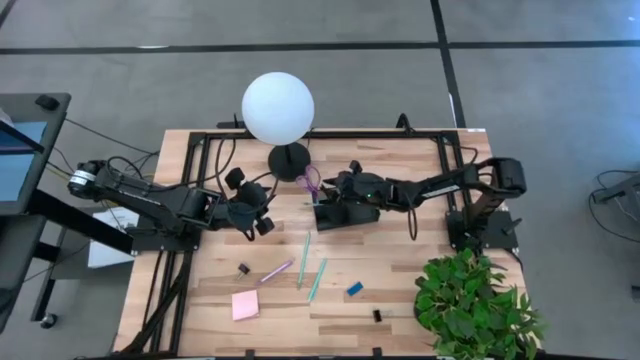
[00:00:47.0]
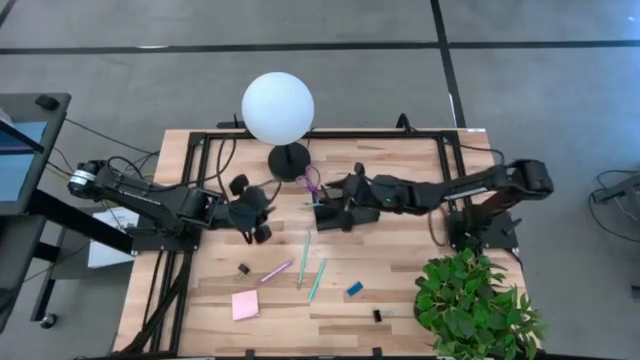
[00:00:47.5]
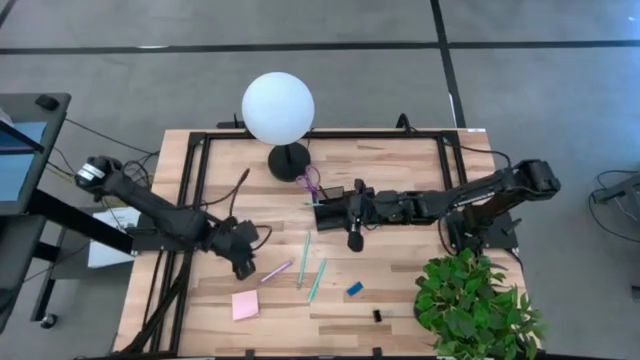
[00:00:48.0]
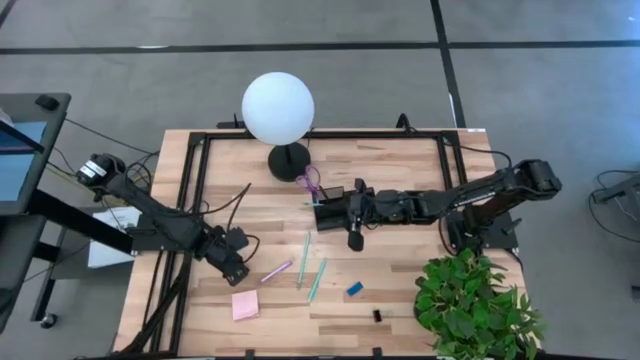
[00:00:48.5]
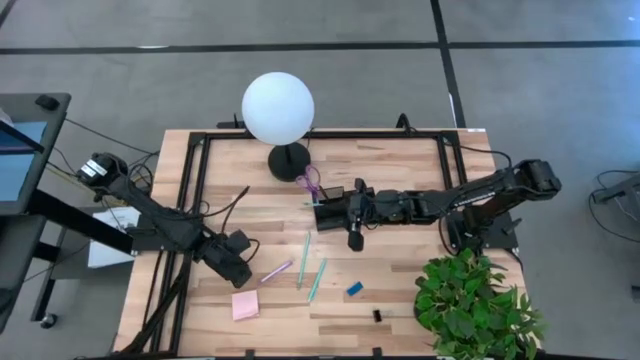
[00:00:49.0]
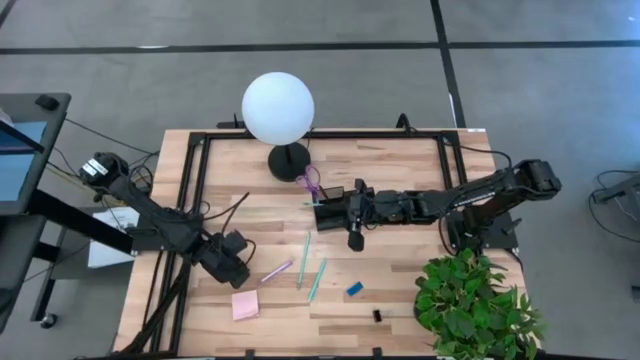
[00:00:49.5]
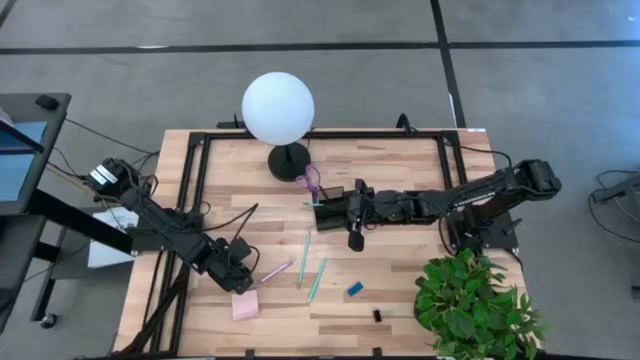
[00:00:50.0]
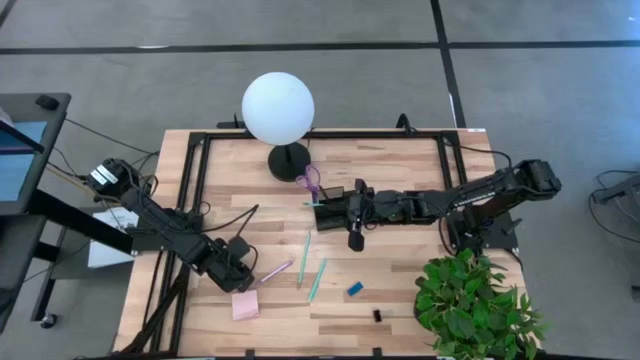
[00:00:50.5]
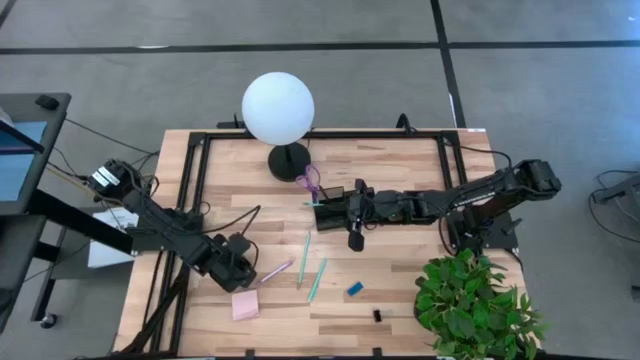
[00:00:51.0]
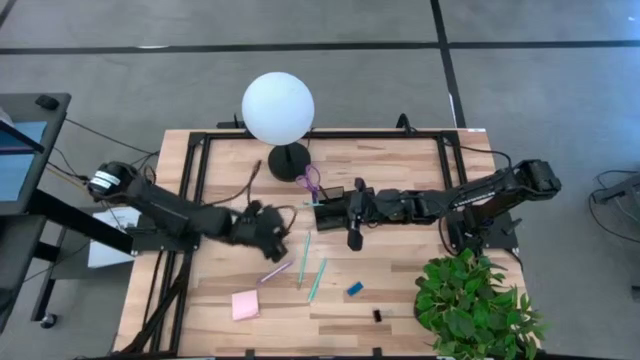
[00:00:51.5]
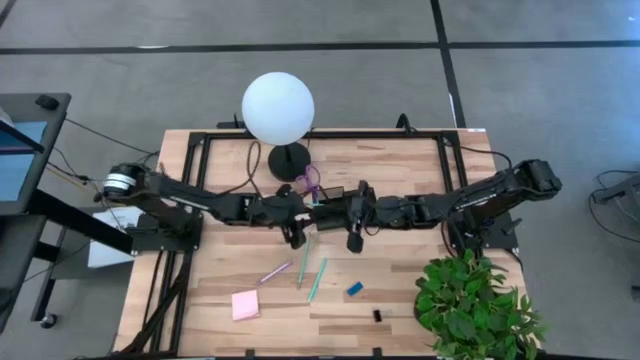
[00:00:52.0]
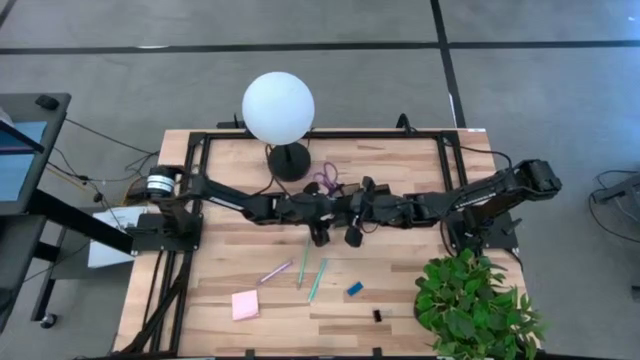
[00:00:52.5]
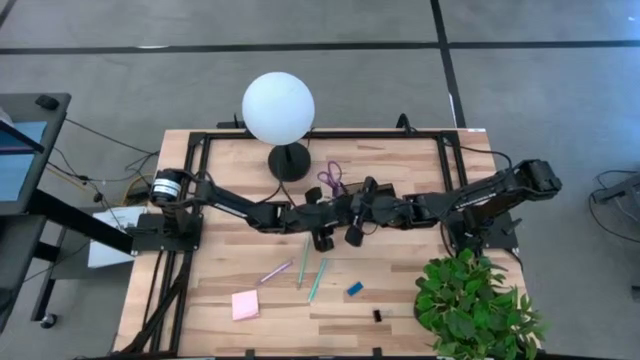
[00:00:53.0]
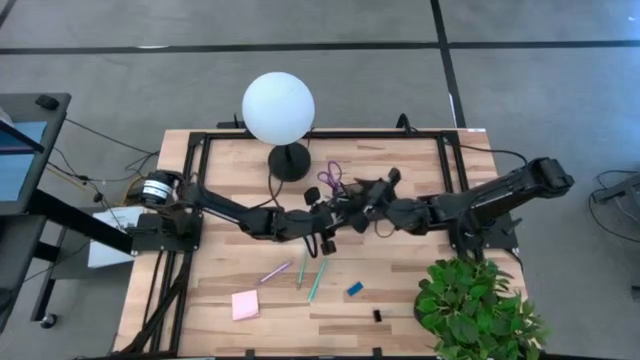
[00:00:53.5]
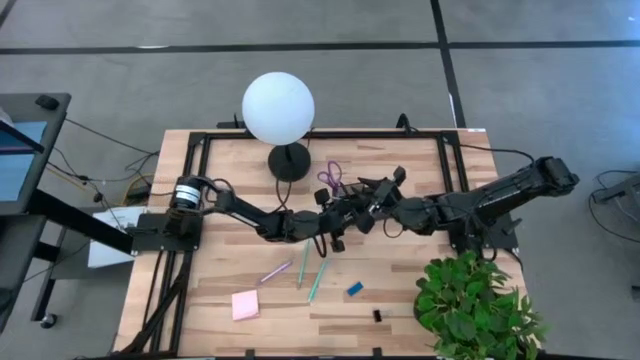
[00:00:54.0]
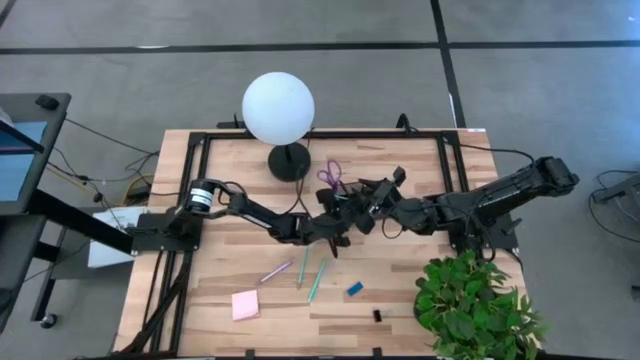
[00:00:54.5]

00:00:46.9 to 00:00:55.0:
Task: Pick and place office supplies into organizer
Put the top black binder clip into the black desk organizer

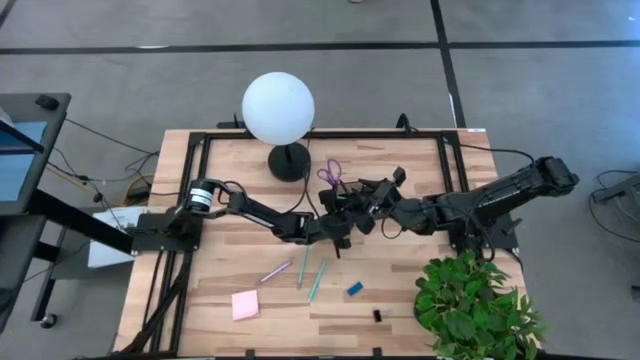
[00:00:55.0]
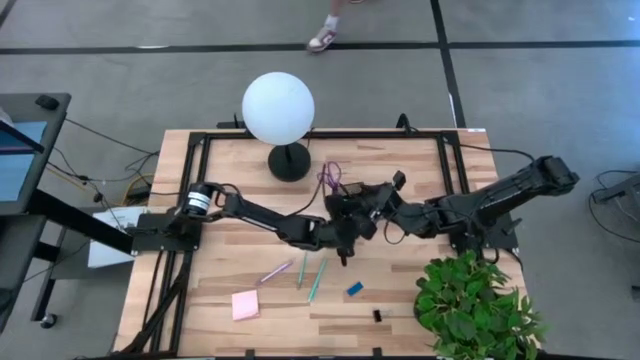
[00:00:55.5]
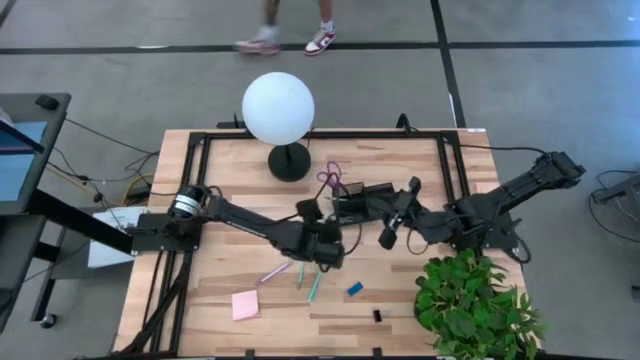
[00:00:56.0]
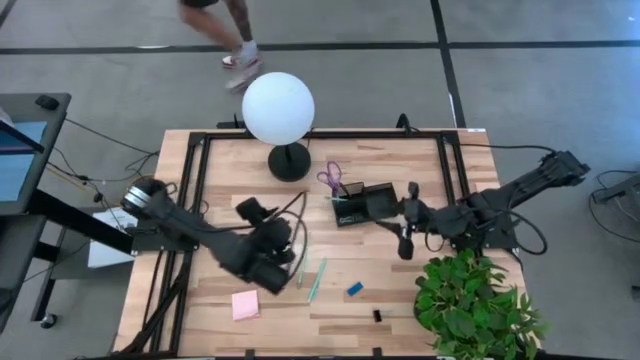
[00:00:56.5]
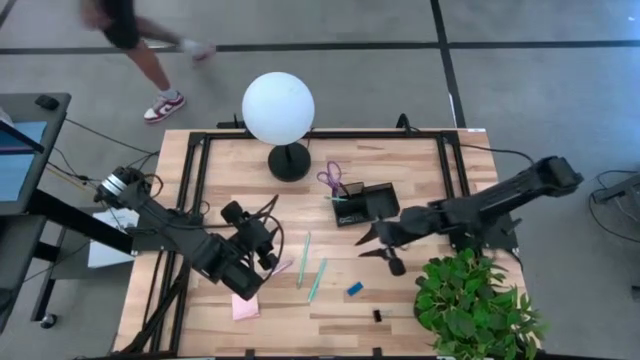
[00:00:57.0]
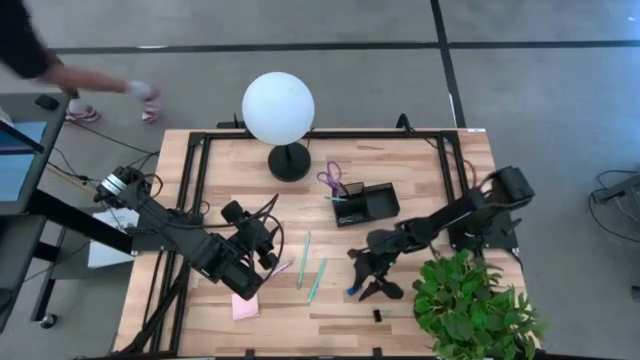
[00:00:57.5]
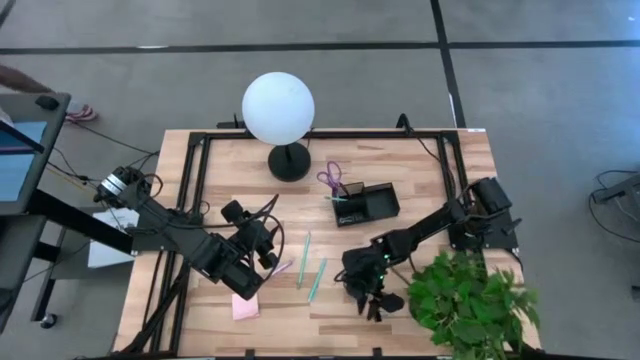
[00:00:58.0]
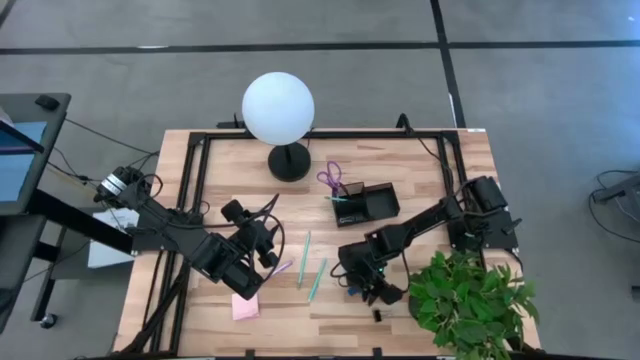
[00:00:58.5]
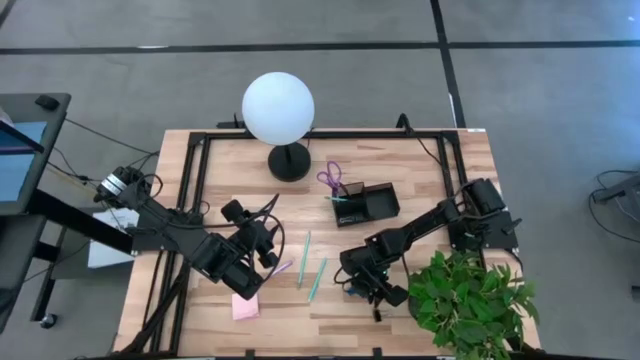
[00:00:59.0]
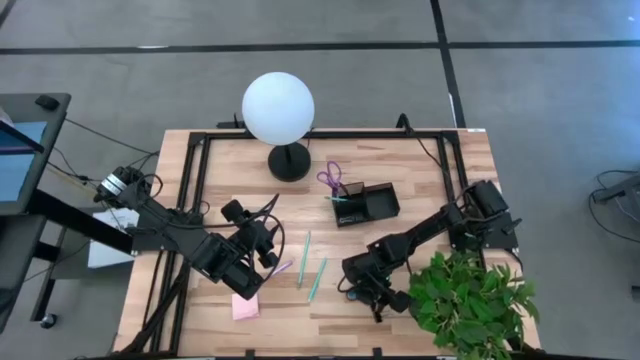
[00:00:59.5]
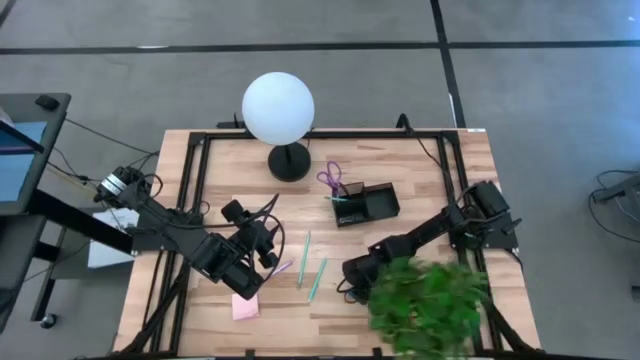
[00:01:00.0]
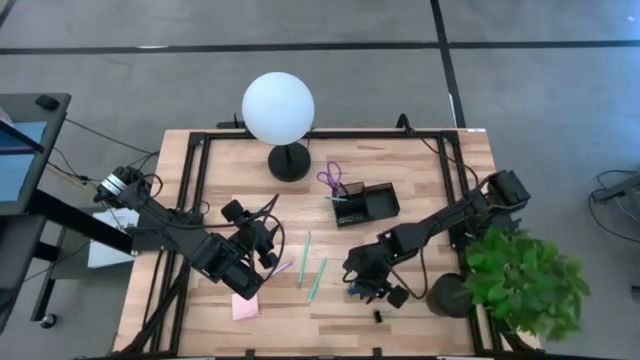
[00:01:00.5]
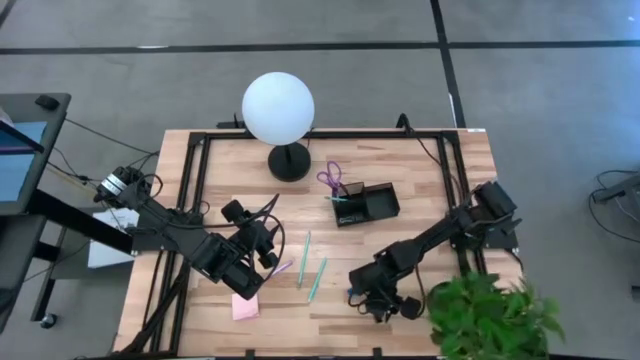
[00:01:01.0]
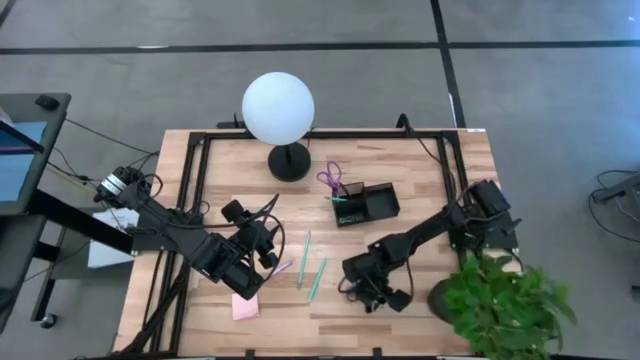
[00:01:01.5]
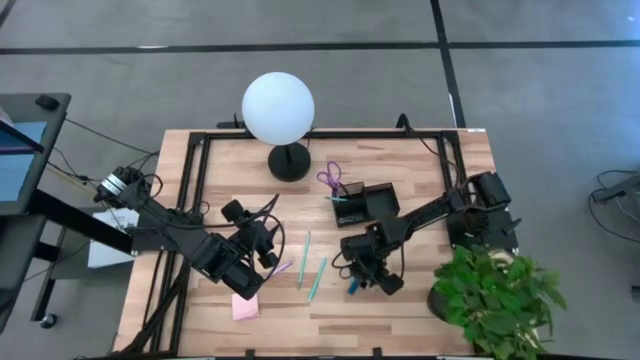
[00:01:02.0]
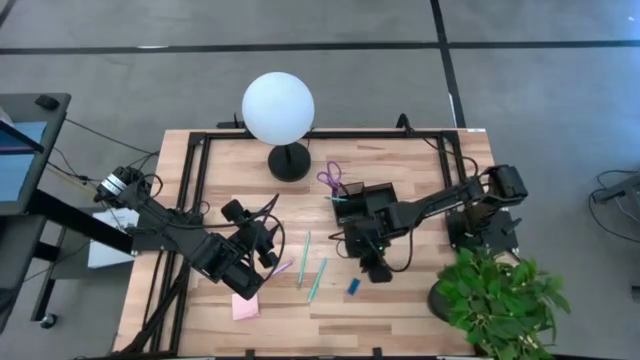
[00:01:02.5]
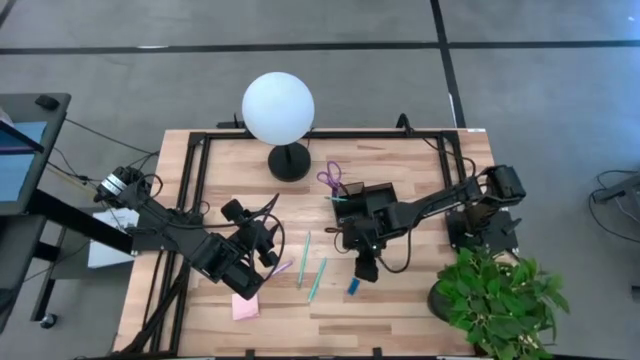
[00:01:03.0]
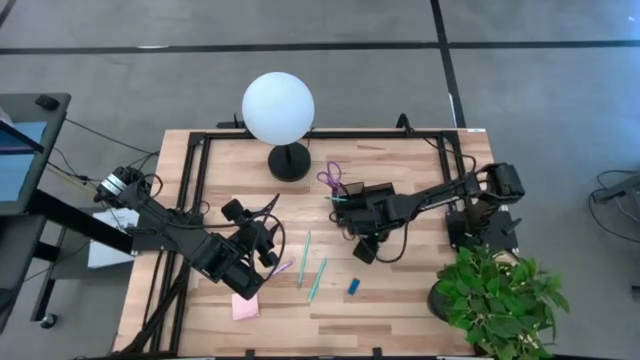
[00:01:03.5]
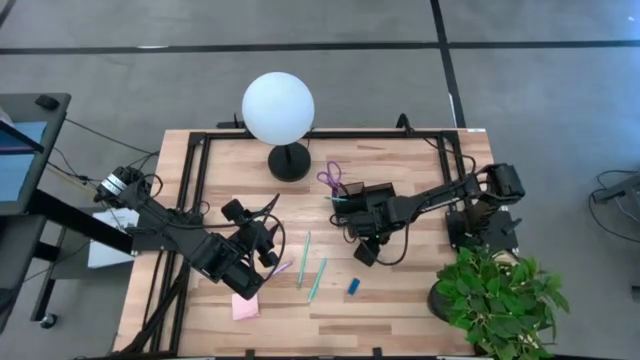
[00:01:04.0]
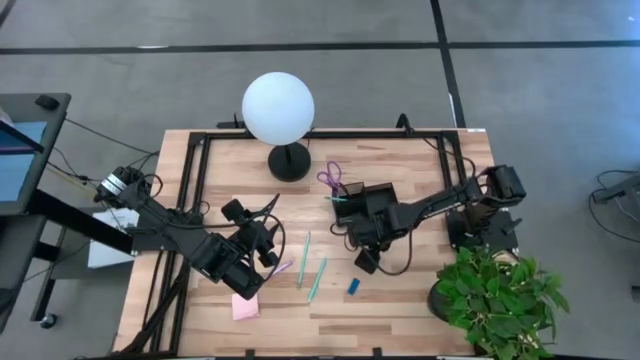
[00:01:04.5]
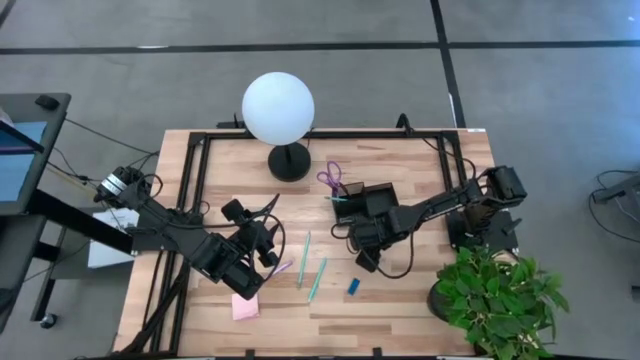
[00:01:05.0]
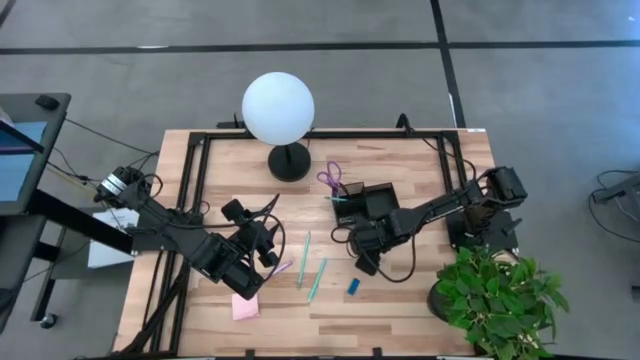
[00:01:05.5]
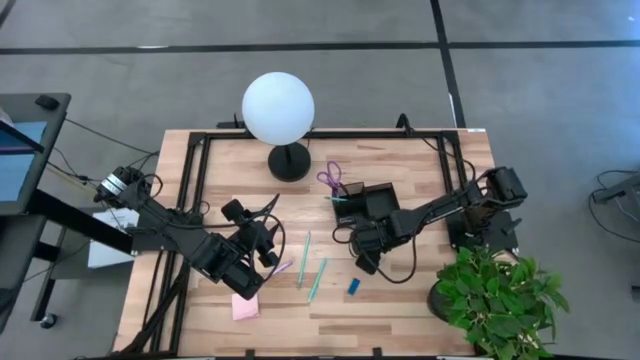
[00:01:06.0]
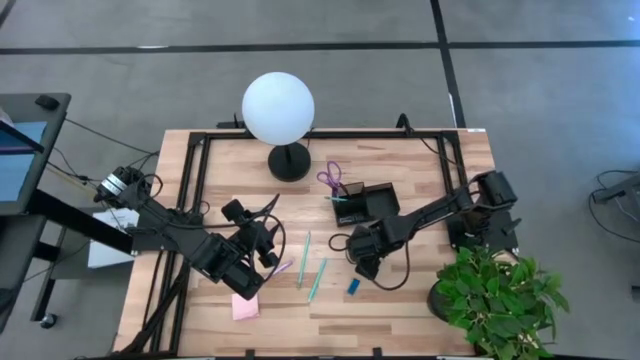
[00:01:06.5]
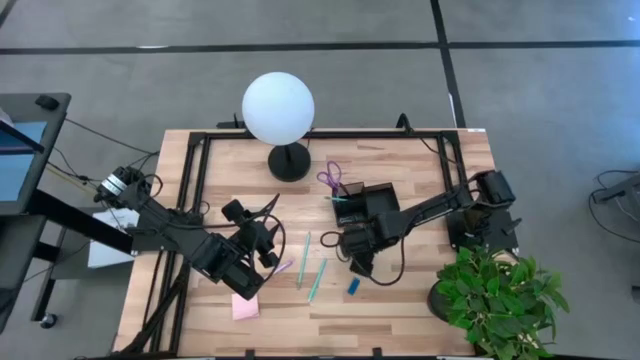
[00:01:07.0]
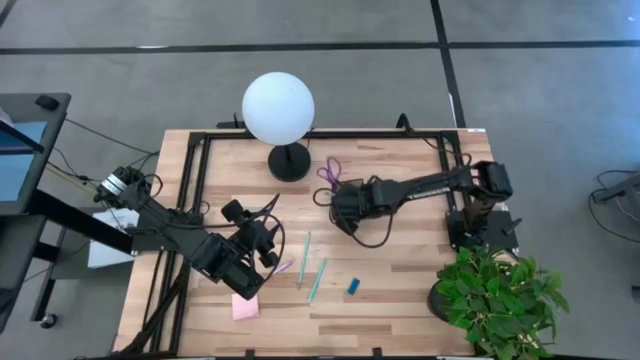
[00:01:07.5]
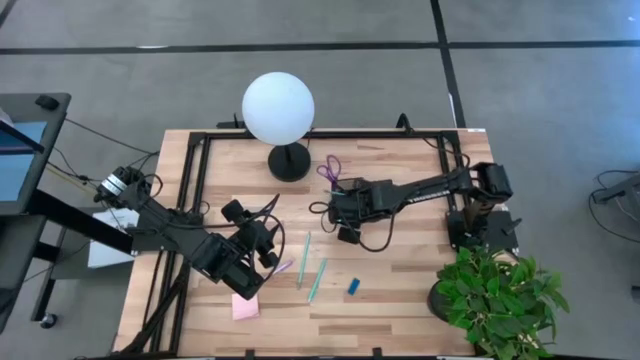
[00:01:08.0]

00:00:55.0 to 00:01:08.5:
Put the black binder clip into the black desk organizer
